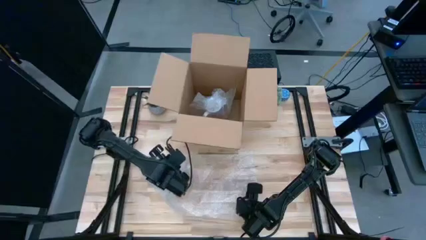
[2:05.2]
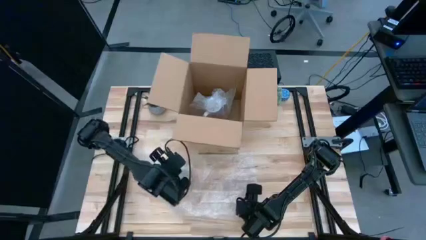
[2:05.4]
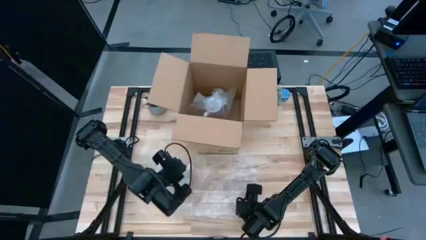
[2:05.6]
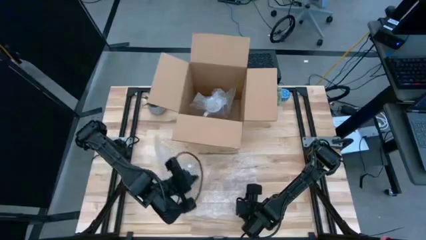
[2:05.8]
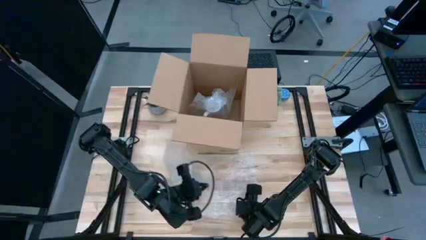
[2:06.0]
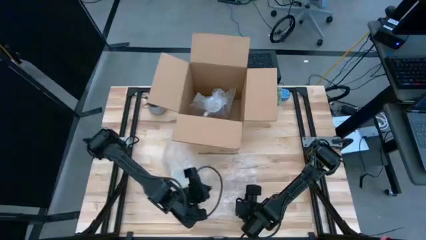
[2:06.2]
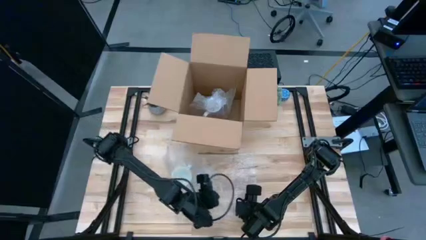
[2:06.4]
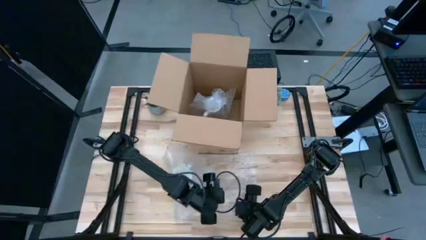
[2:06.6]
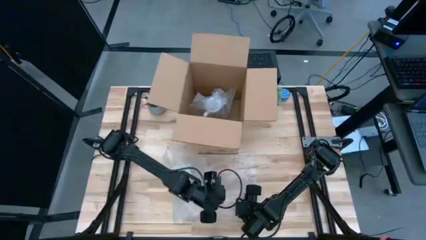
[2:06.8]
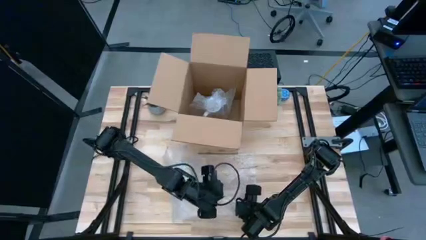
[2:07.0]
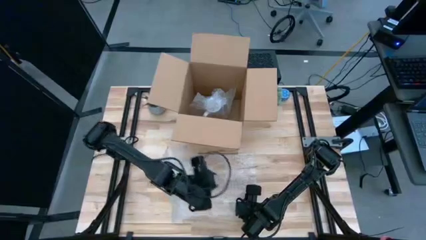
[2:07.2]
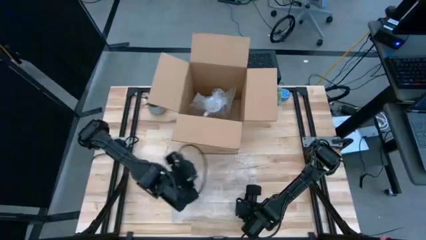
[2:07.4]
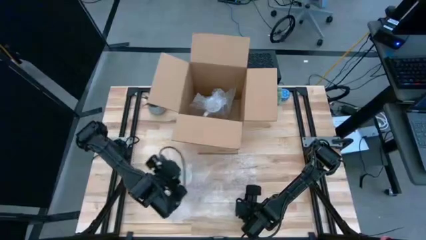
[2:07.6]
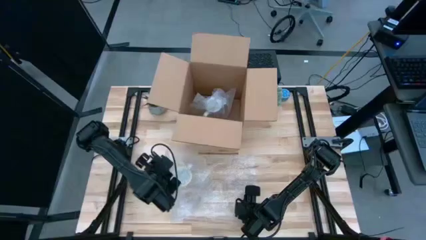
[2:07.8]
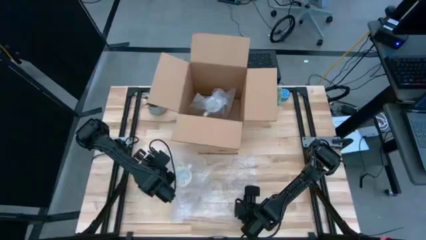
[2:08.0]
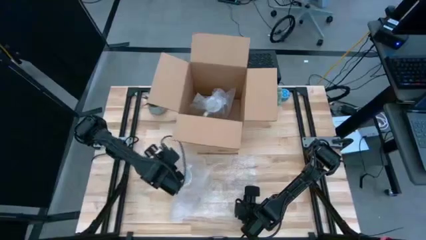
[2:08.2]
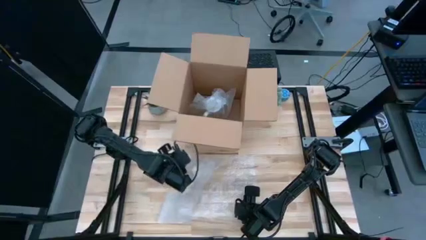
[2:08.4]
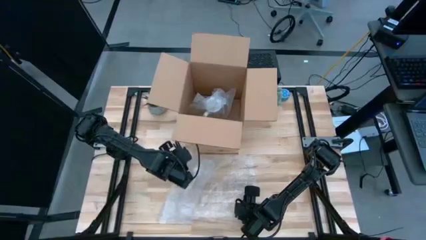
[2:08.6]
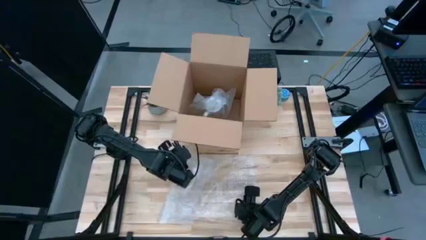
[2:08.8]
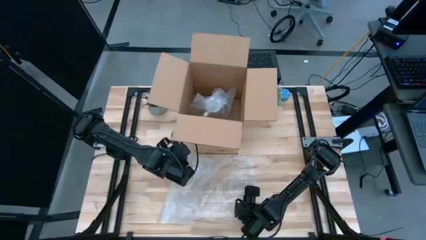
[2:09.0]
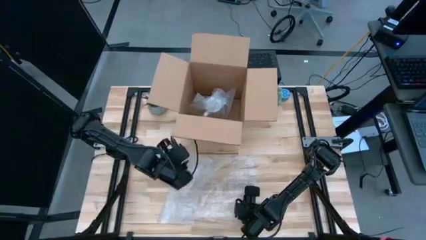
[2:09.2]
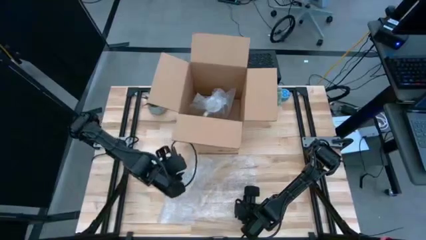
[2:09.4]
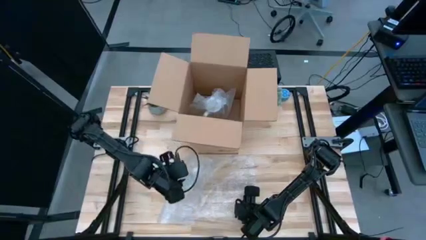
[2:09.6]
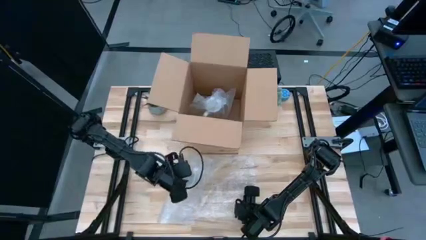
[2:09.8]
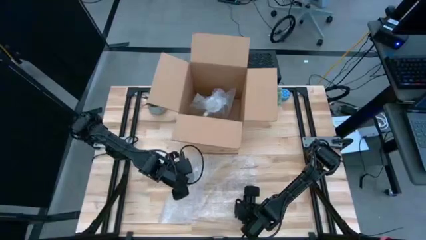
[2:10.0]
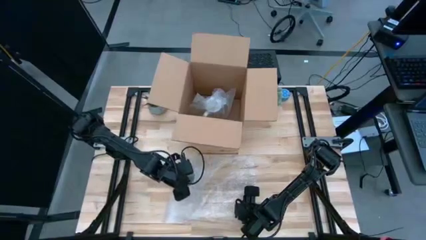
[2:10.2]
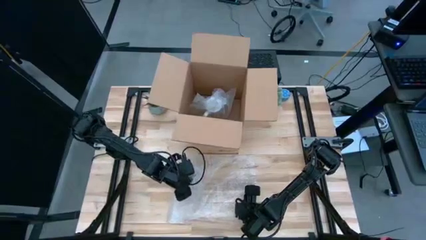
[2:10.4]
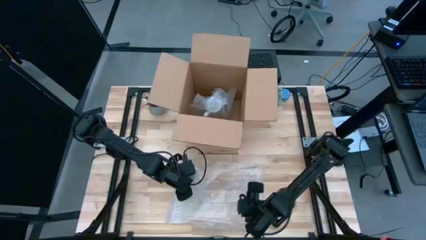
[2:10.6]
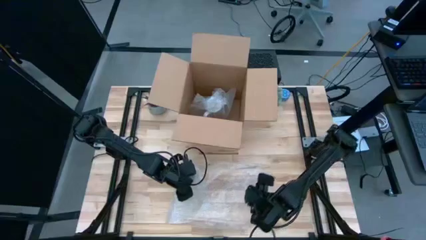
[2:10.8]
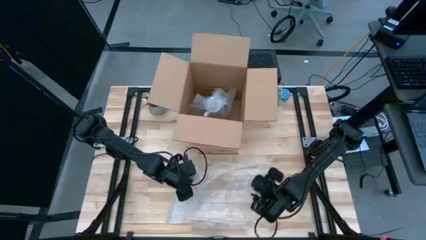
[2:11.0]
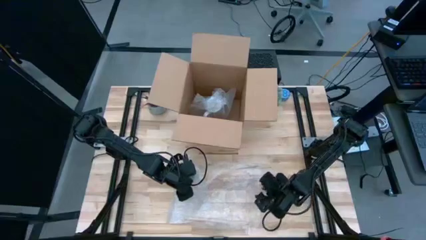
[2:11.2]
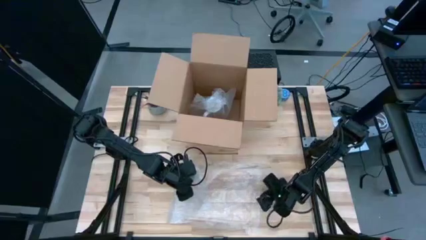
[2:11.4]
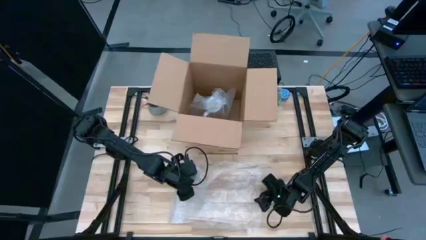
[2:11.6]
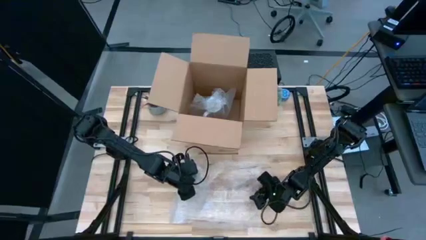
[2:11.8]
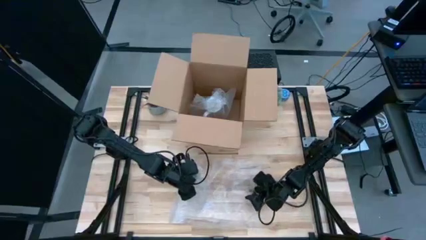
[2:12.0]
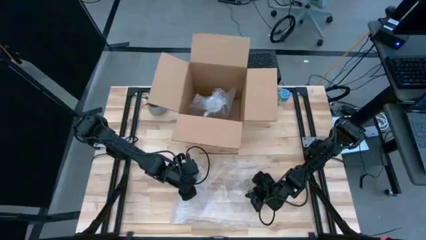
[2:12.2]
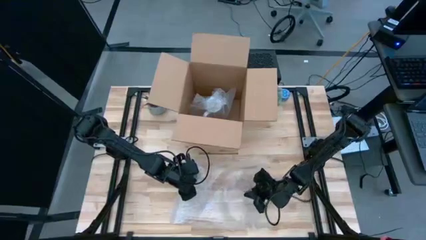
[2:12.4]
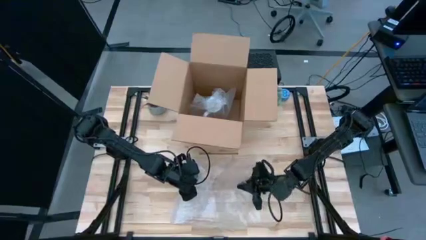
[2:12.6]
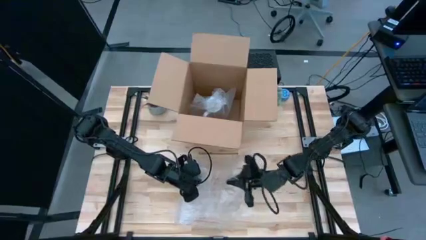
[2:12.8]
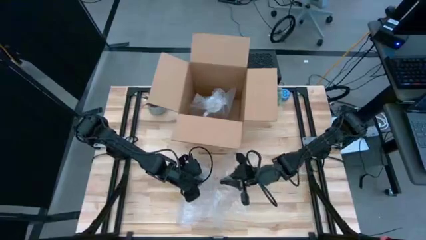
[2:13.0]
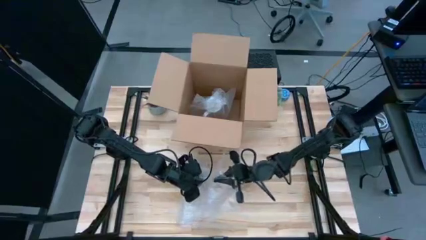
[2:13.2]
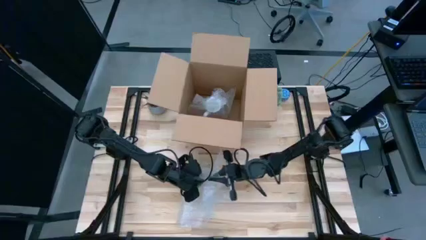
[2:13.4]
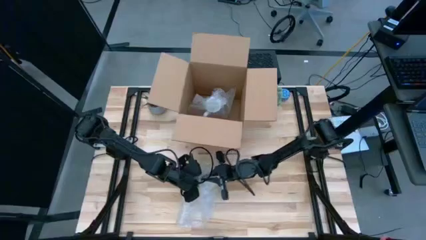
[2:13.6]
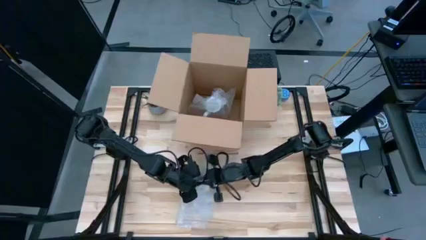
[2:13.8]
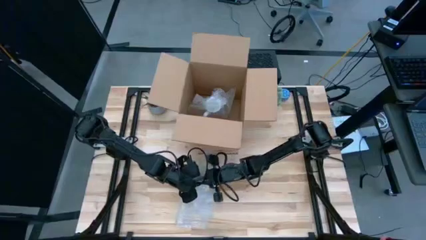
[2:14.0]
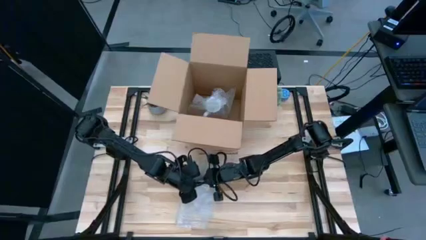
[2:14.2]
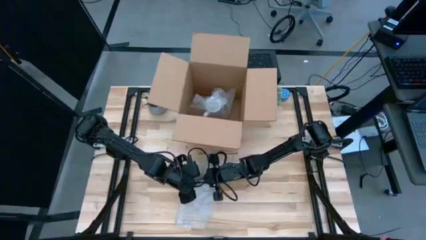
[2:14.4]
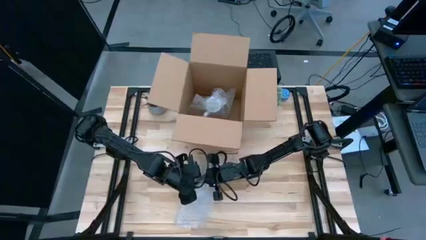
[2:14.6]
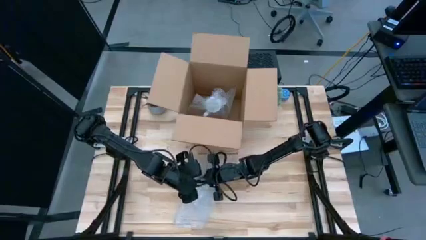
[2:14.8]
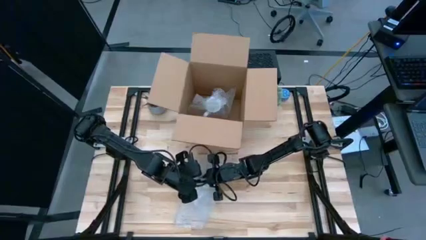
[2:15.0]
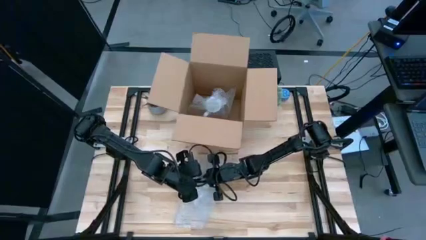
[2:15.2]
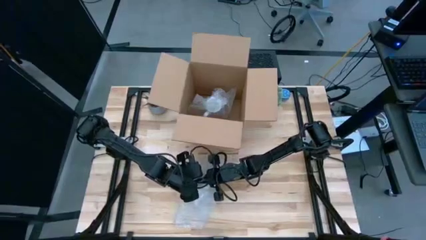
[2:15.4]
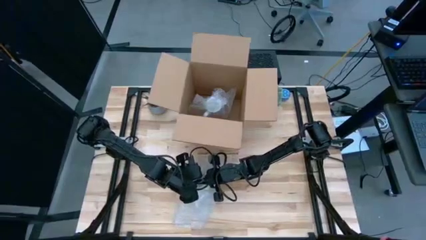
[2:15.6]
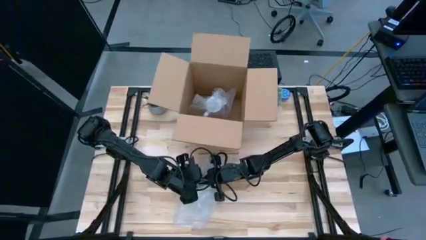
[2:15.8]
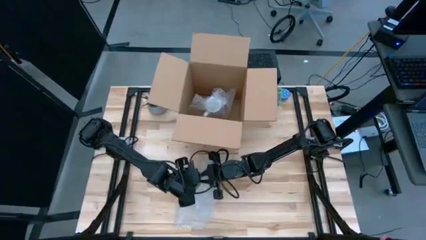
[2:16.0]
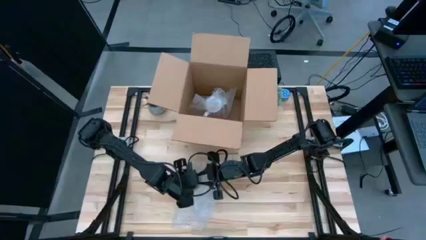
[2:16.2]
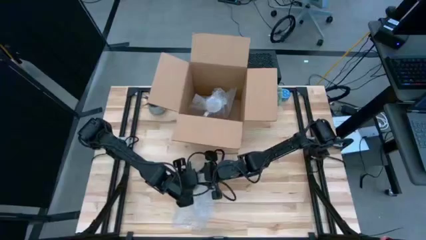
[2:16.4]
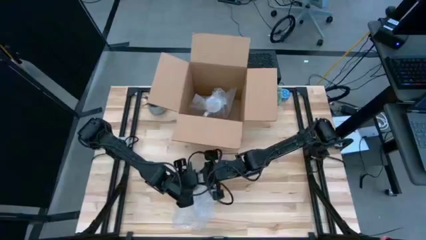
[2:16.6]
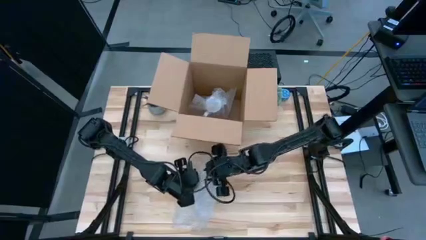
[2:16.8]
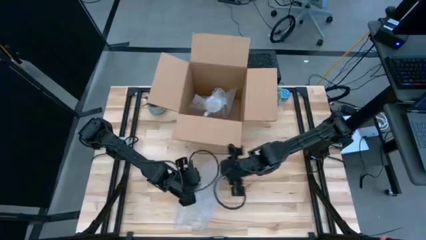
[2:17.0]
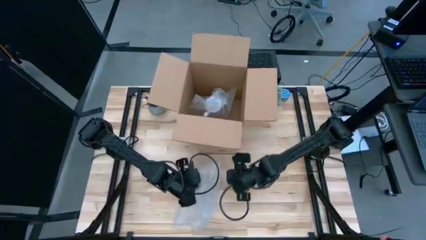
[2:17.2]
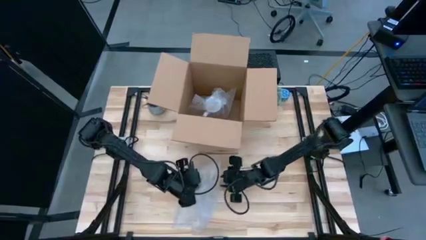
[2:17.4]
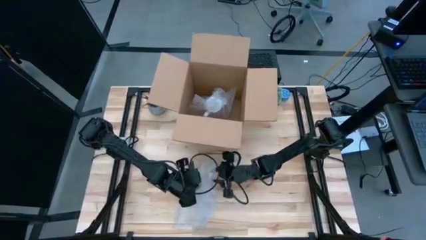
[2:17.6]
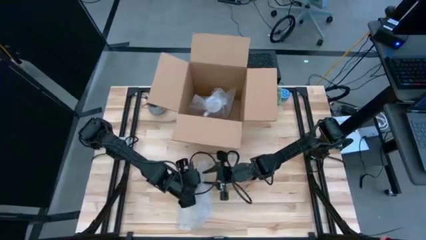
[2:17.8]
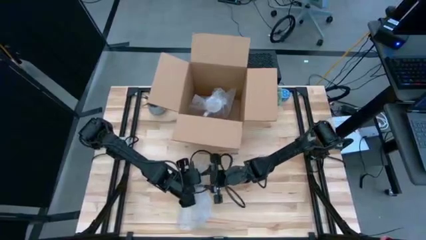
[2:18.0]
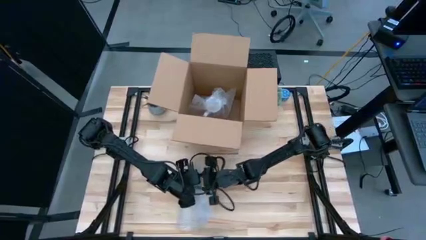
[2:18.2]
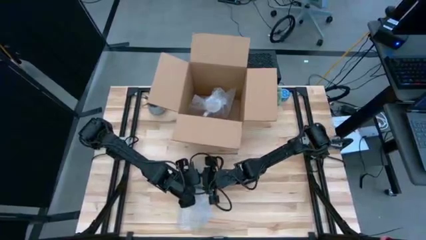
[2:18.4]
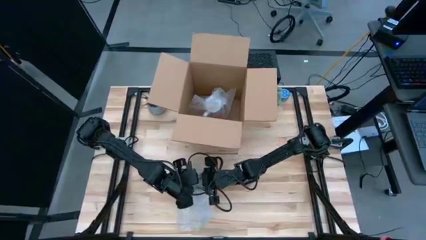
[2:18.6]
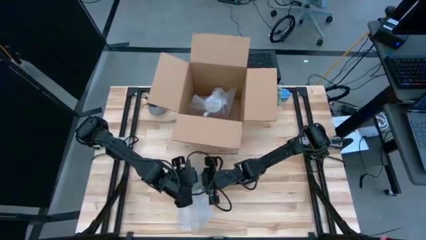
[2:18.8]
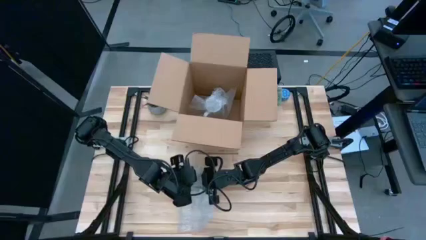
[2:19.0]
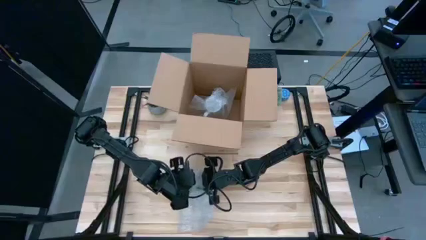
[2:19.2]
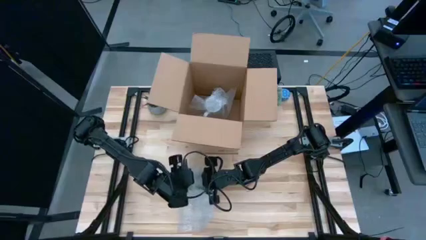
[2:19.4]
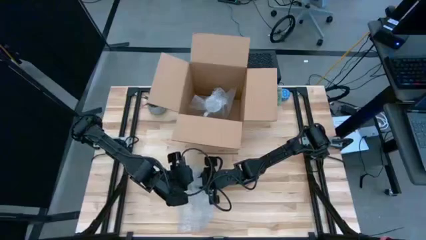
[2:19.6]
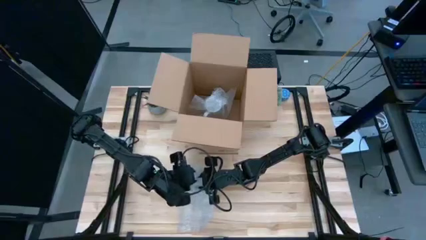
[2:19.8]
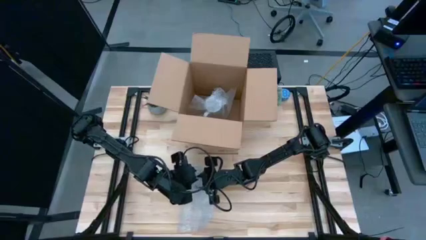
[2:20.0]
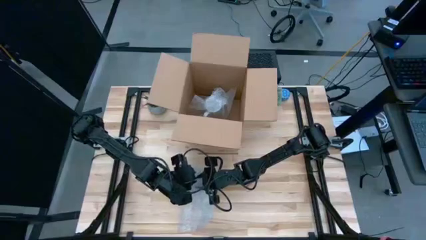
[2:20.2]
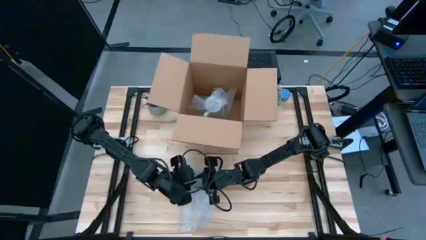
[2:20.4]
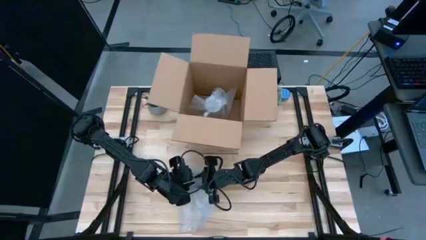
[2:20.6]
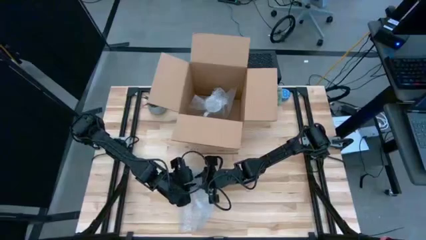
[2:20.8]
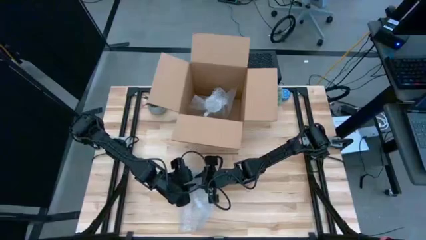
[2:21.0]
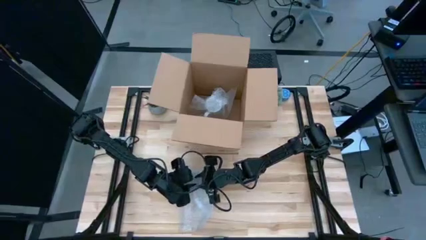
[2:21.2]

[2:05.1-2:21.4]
Task: wrap mug
Wrap the orange mug with bubble wrap
